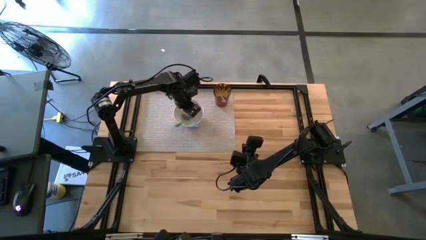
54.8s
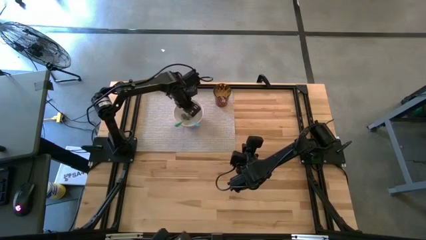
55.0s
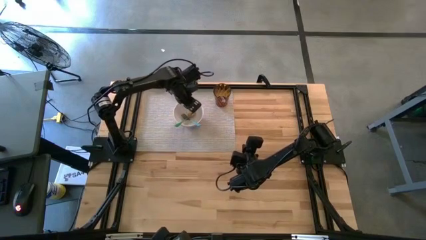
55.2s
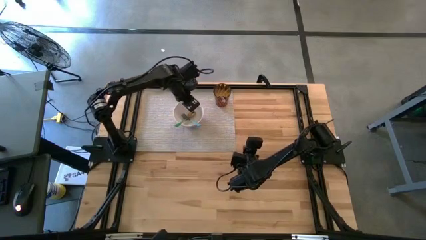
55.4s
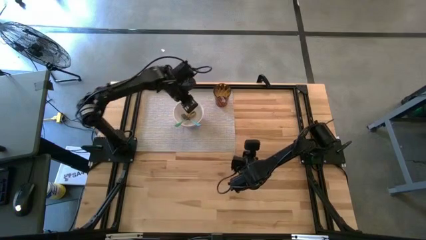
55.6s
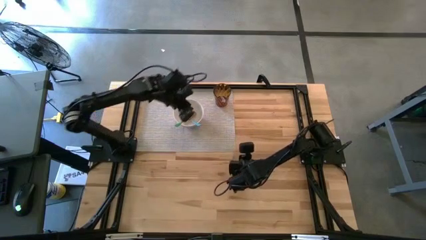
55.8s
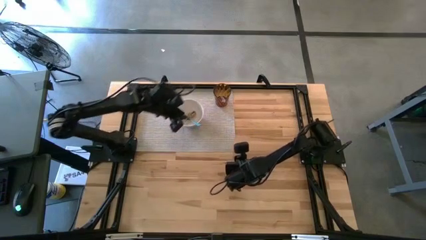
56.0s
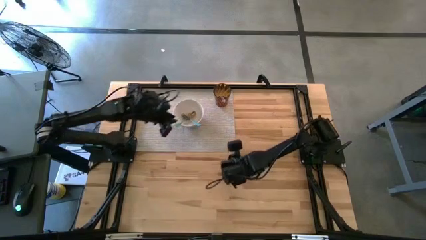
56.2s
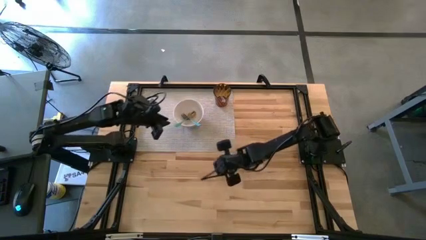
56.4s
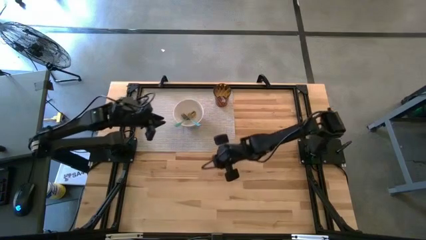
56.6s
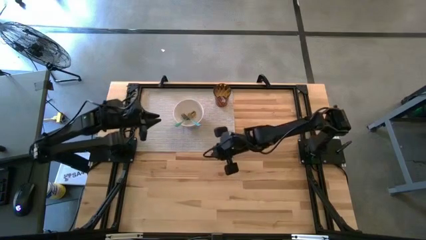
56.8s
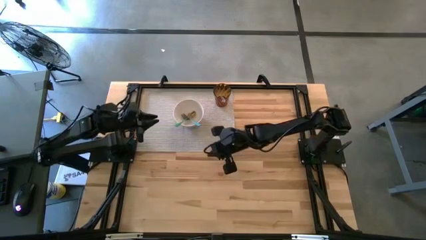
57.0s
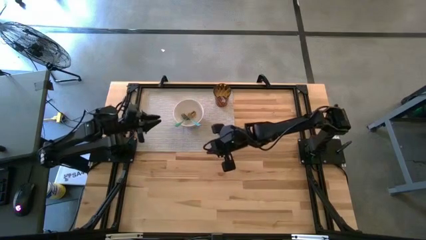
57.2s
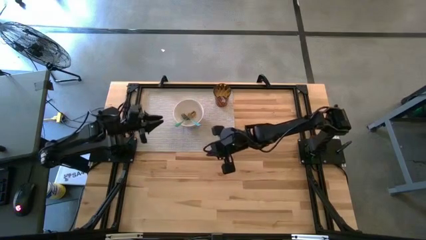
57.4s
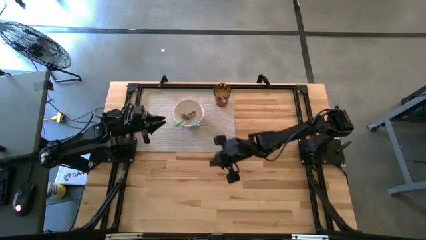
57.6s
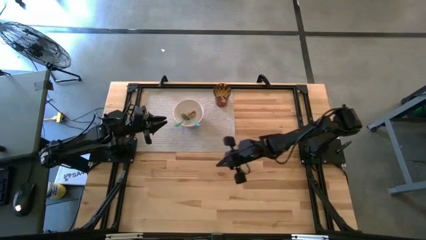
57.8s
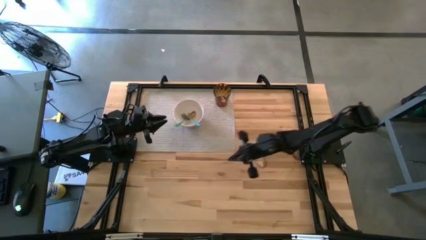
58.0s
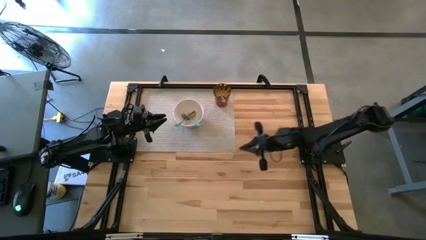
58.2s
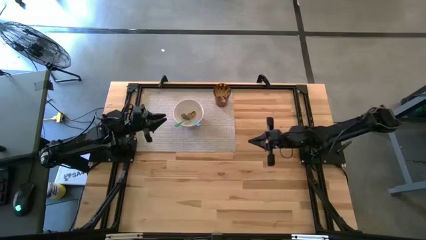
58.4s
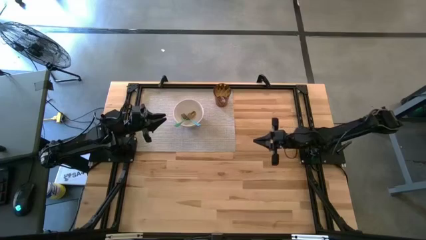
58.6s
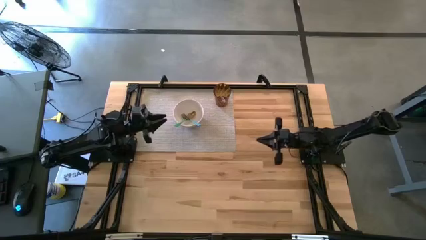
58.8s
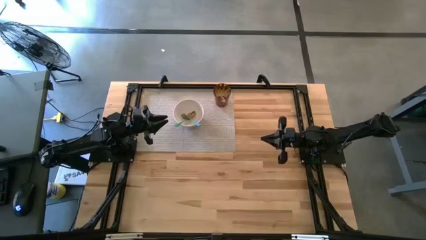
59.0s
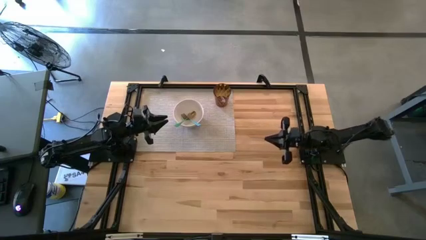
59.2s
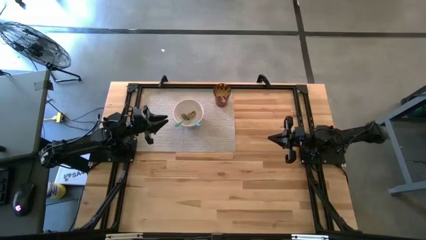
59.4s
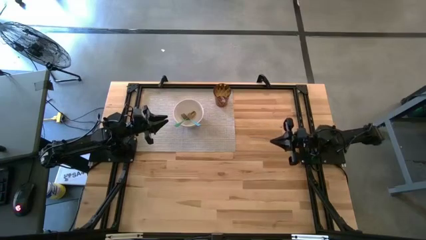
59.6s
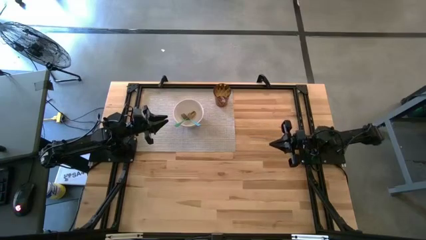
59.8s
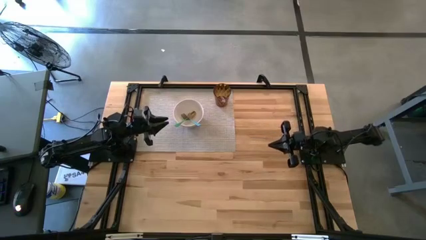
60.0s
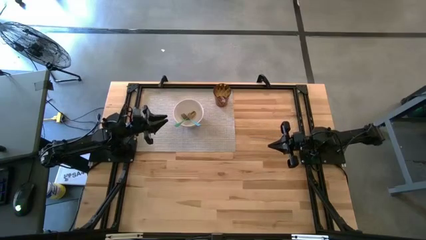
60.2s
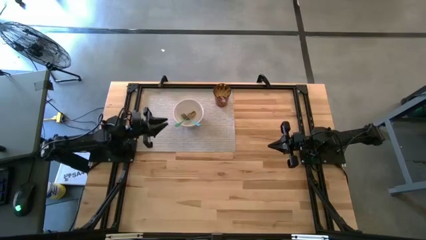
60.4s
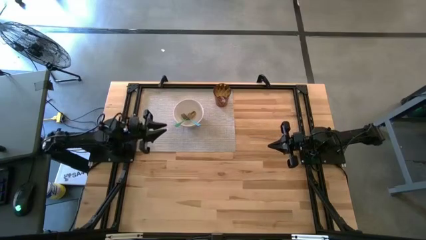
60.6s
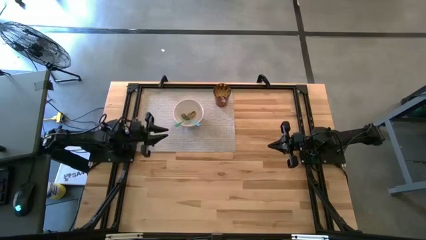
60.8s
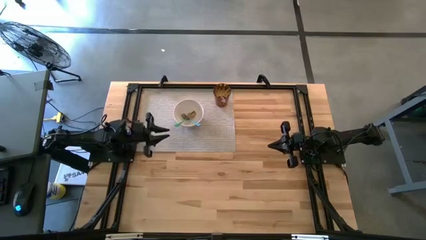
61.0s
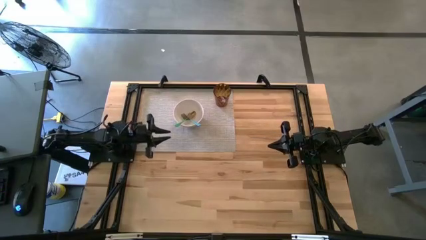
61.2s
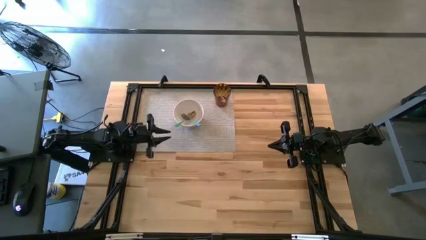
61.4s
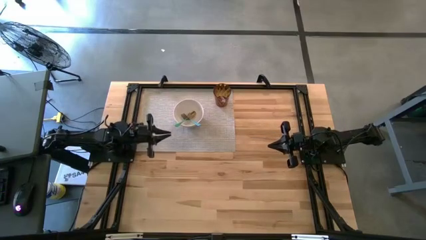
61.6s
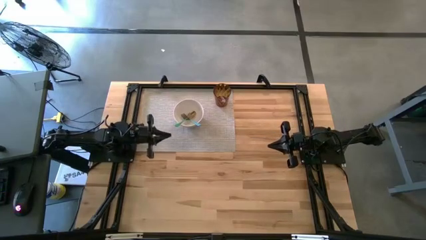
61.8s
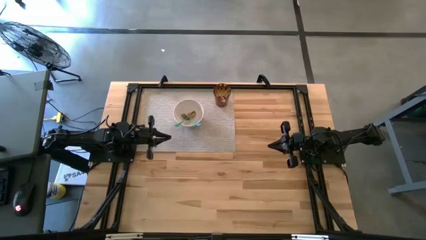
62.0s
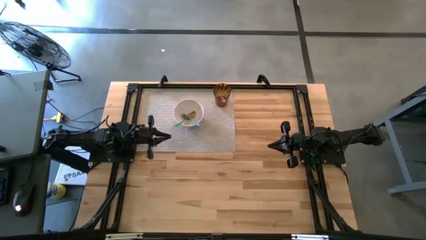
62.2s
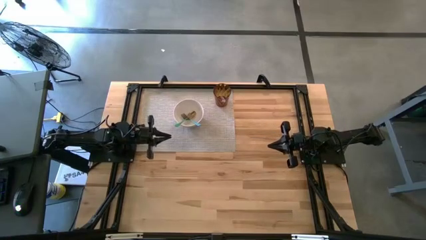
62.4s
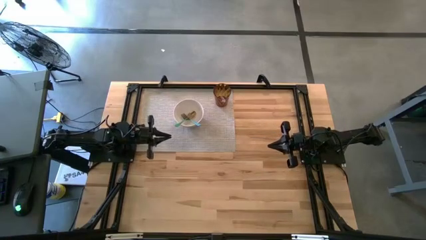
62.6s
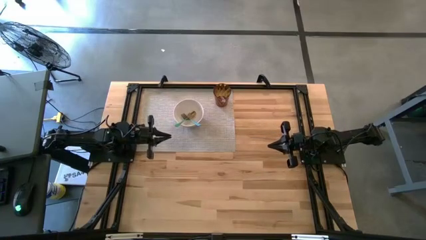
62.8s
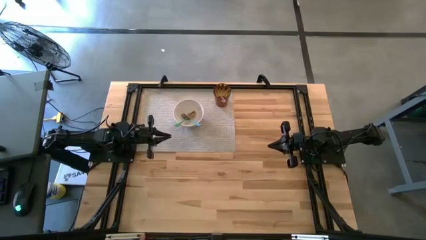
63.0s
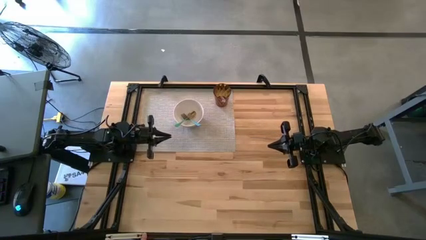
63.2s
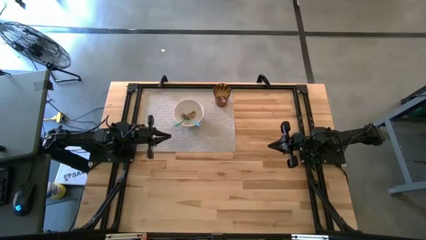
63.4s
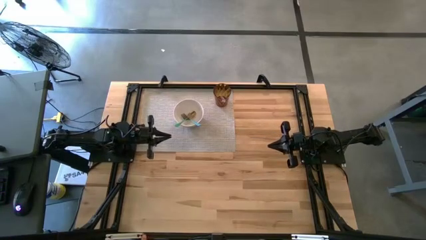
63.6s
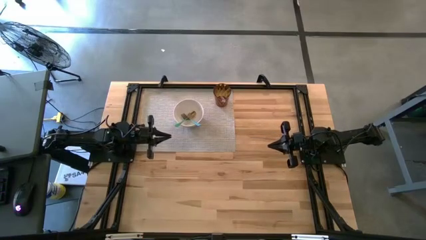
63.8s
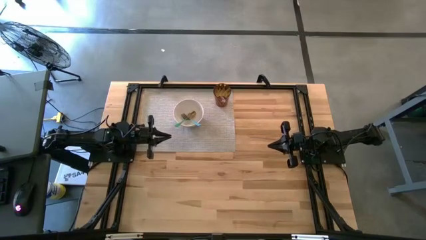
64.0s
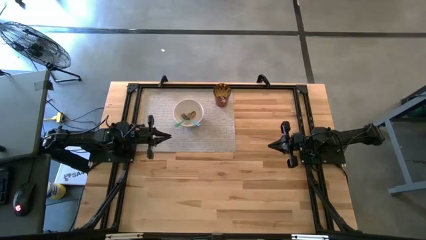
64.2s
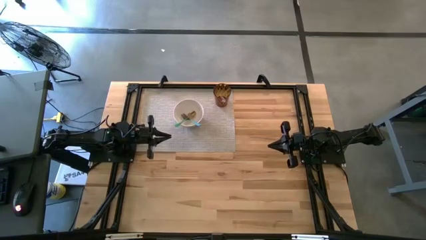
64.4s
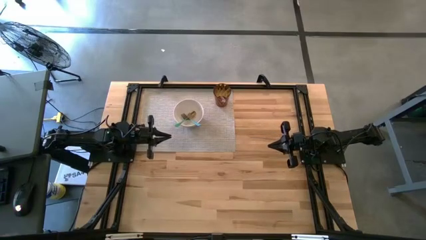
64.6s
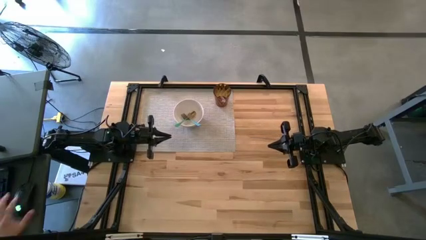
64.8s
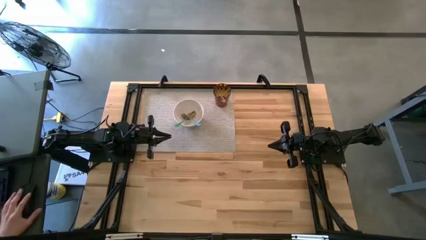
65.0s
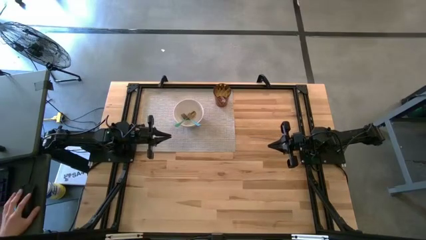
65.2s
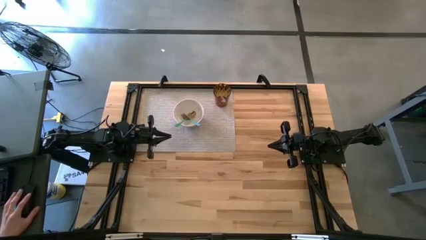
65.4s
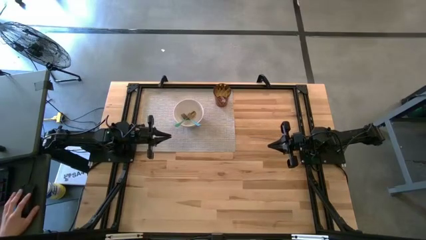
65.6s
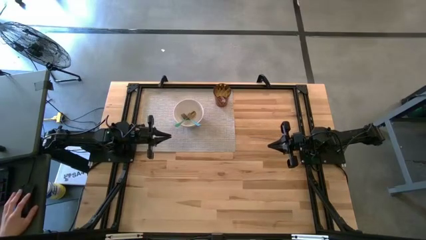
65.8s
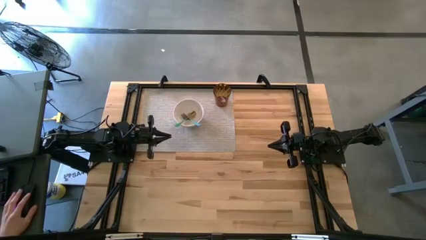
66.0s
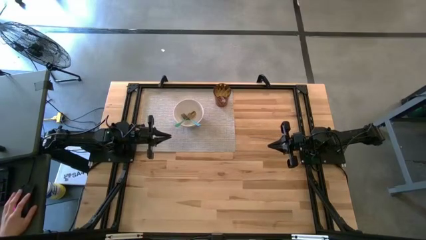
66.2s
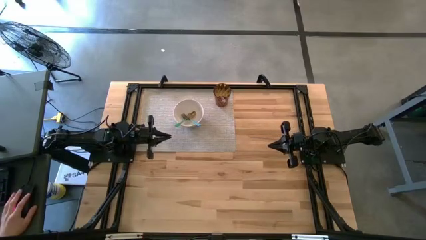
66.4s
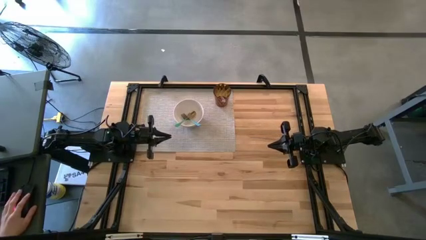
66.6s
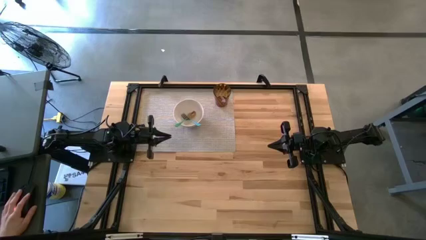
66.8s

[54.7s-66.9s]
Task: Pick & Place Utensil
Return to Home Position

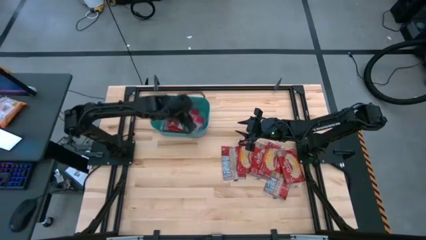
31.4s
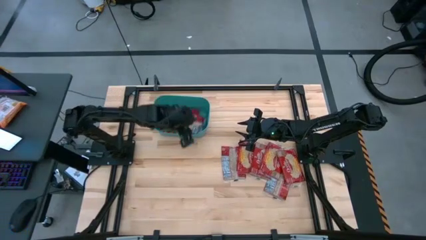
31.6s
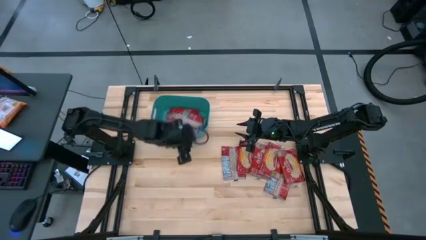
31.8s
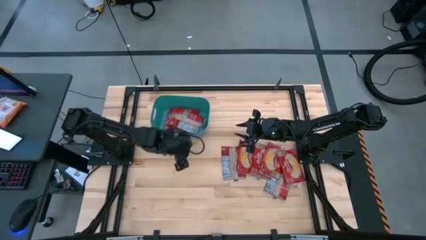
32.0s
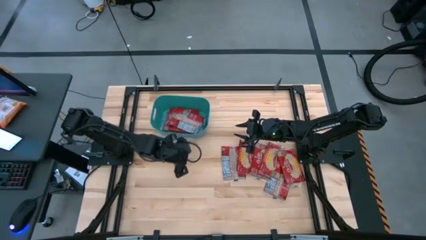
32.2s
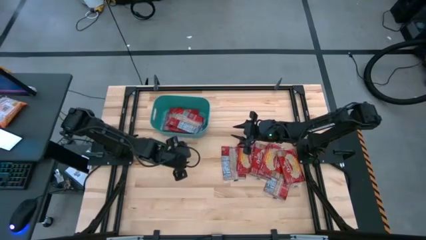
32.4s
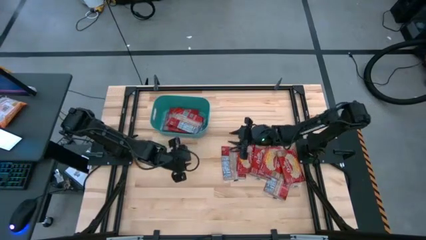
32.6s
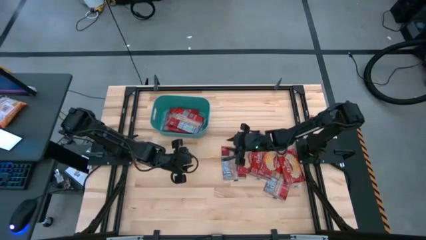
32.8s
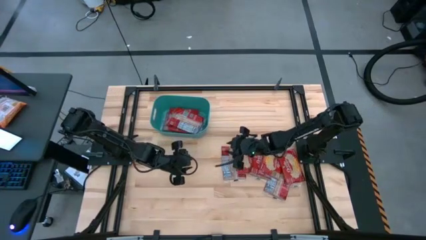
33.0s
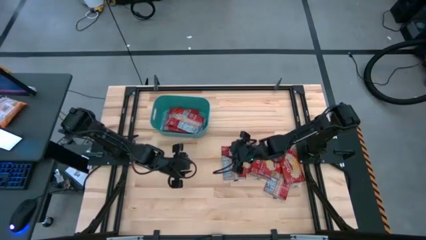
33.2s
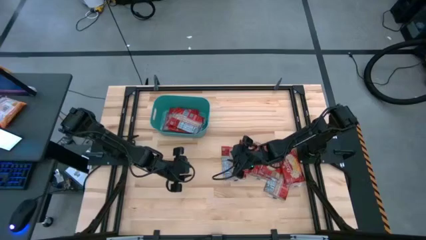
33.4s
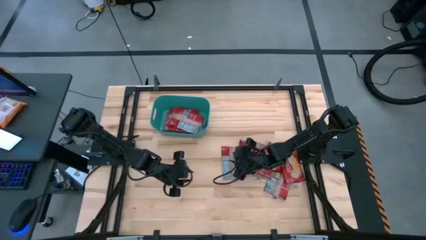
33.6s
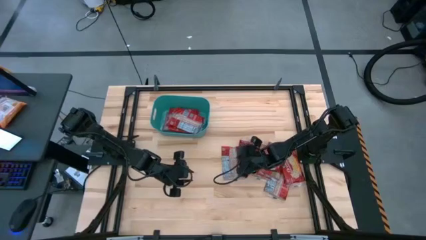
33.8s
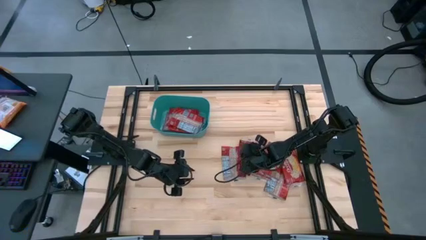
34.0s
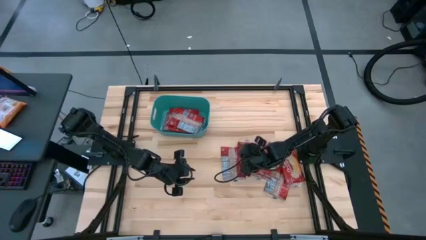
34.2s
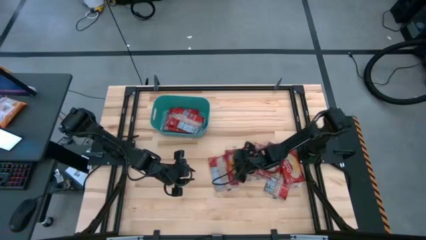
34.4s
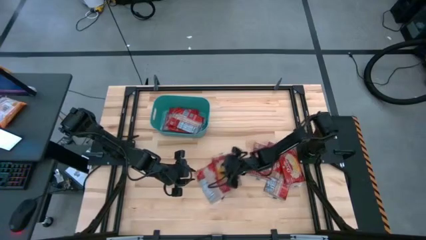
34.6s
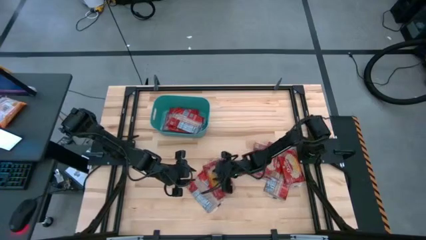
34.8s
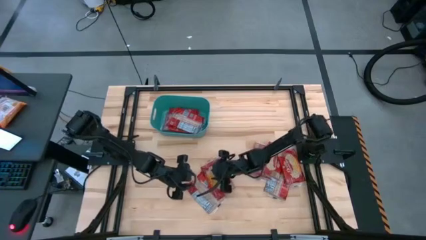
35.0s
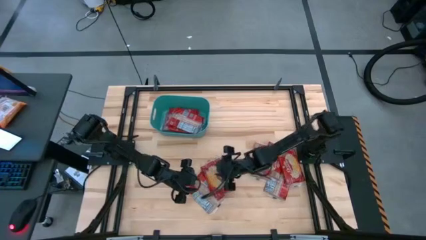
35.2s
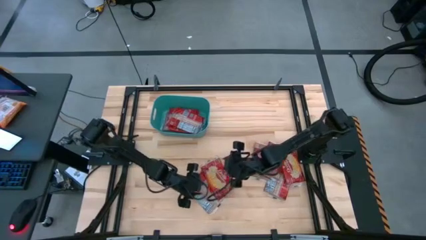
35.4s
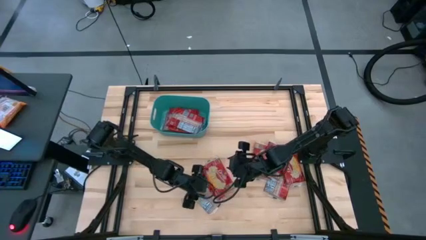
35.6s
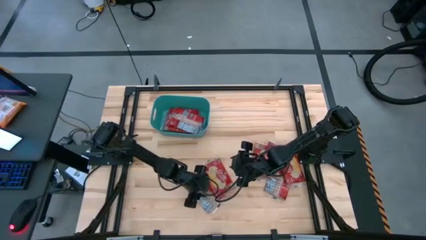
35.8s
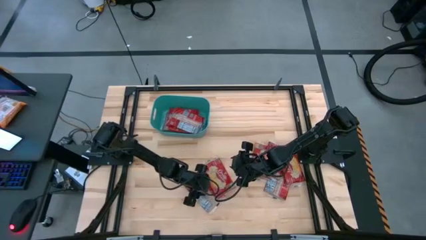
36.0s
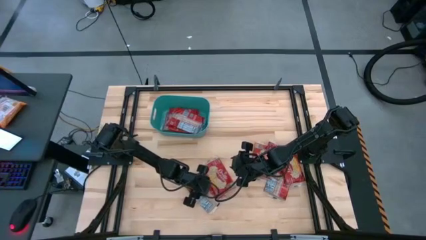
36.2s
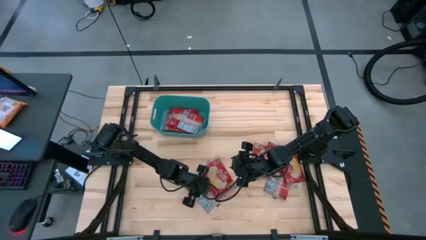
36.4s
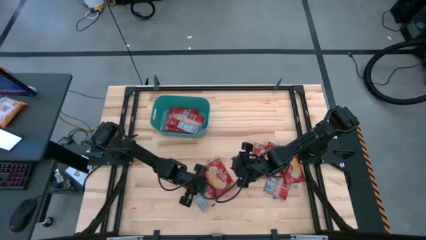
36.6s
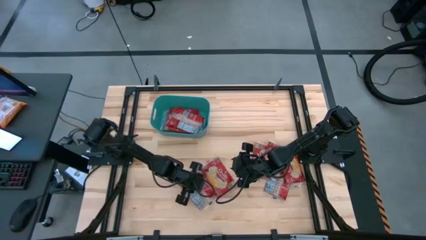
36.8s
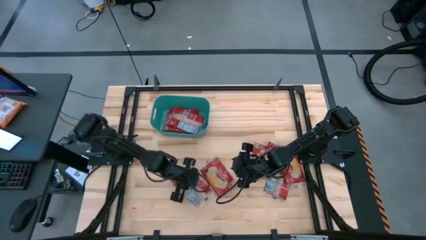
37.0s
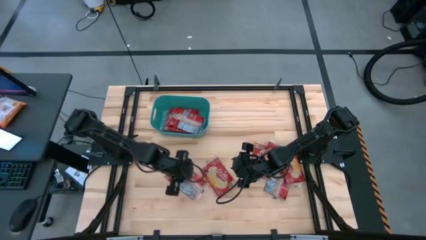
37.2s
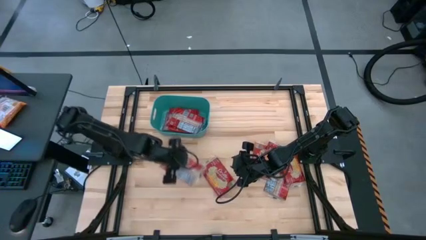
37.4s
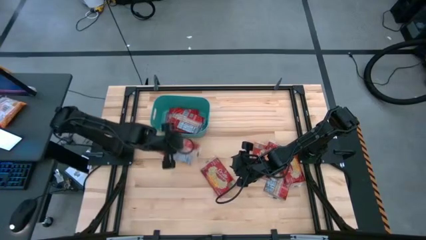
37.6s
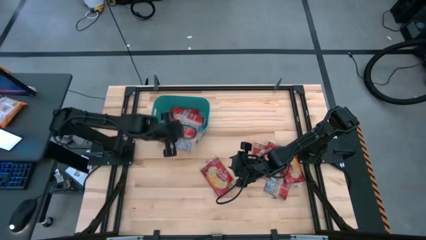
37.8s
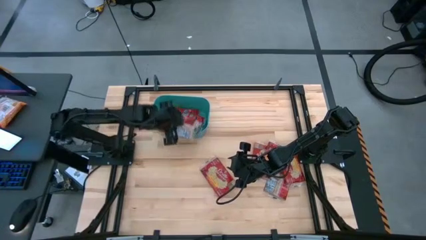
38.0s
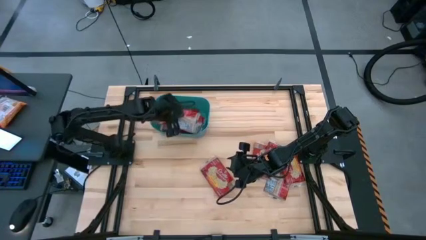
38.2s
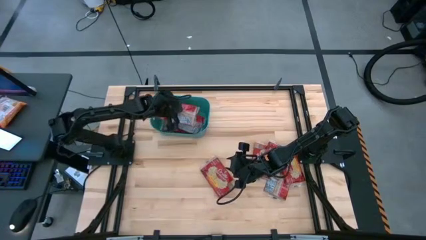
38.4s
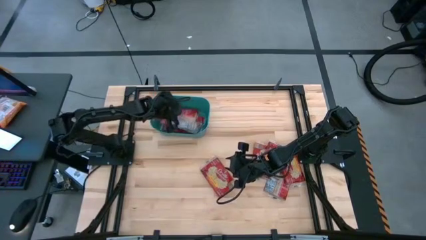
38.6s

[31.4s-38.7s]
Task: Sort popcorn bags into baskets
Put the red popcorn pack into the green bin
